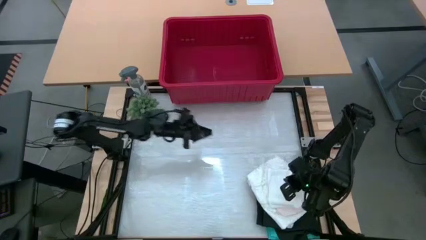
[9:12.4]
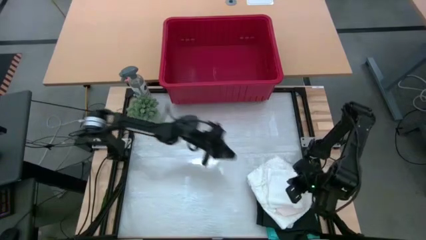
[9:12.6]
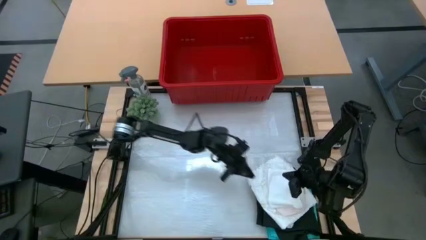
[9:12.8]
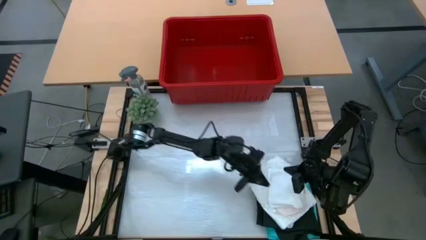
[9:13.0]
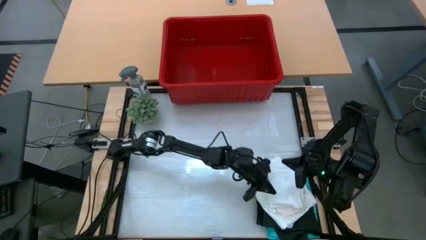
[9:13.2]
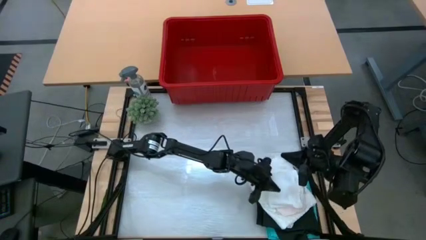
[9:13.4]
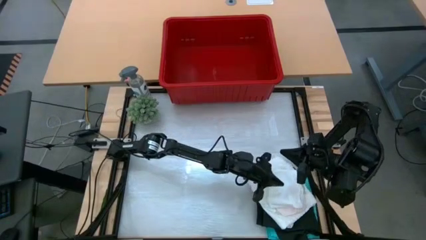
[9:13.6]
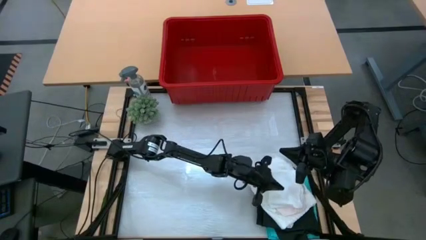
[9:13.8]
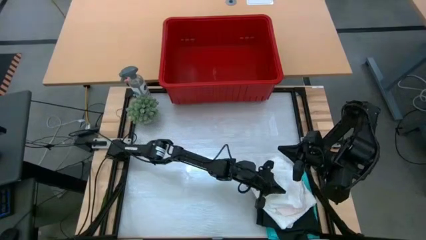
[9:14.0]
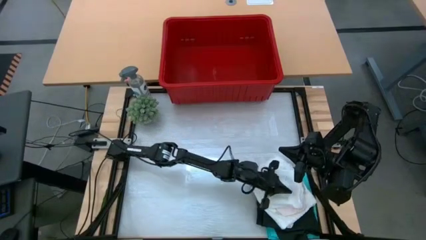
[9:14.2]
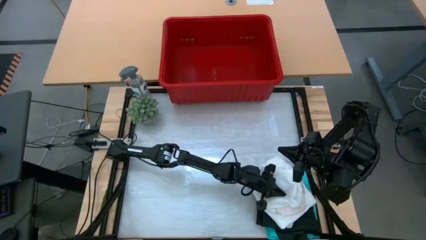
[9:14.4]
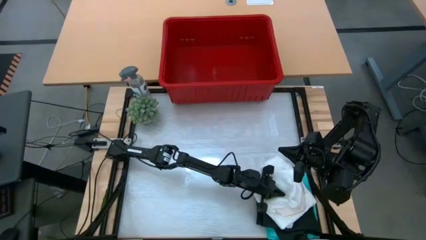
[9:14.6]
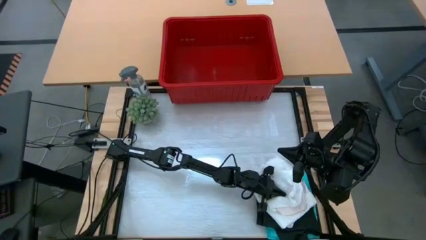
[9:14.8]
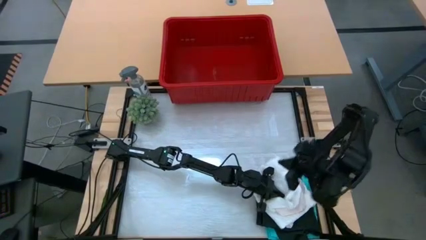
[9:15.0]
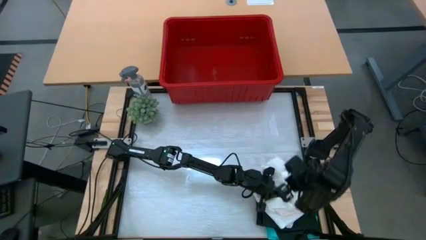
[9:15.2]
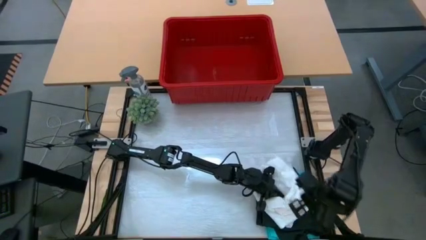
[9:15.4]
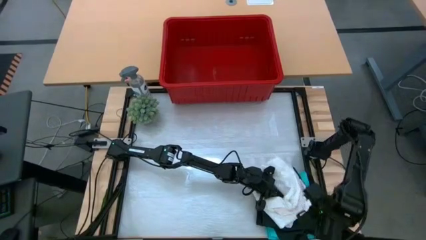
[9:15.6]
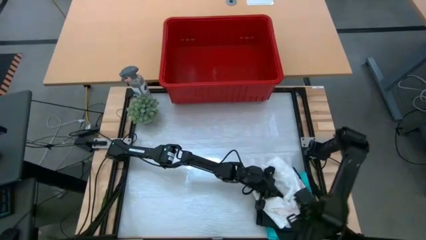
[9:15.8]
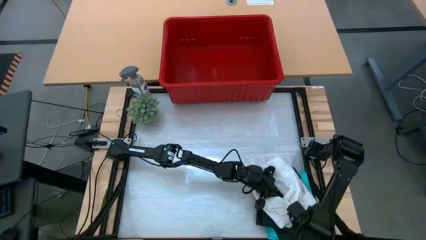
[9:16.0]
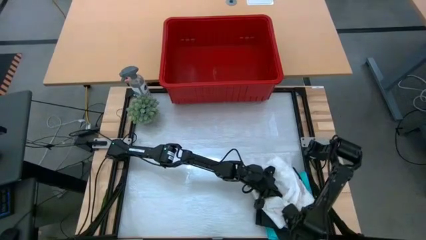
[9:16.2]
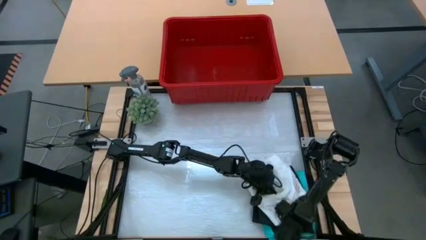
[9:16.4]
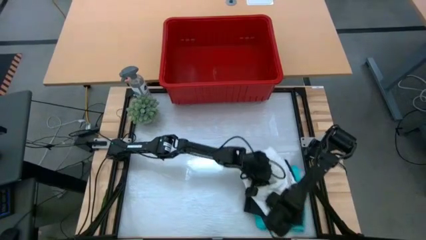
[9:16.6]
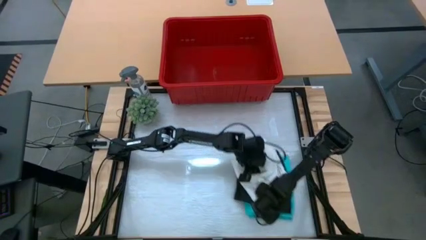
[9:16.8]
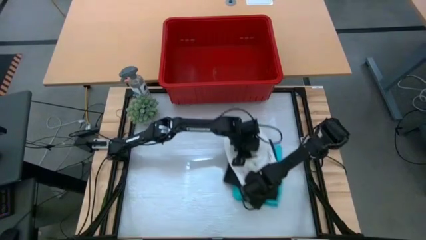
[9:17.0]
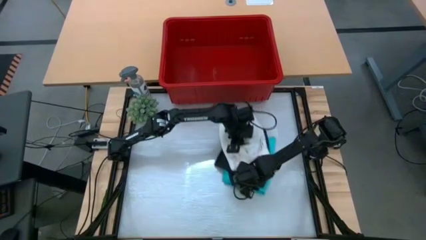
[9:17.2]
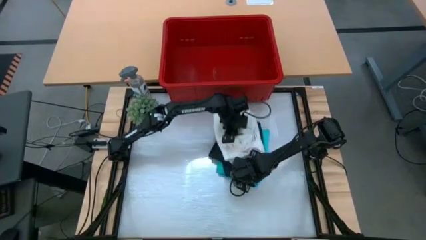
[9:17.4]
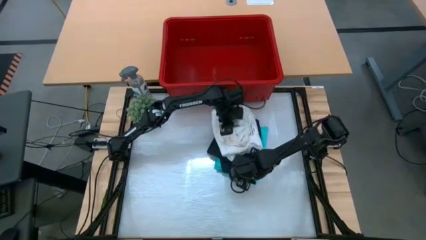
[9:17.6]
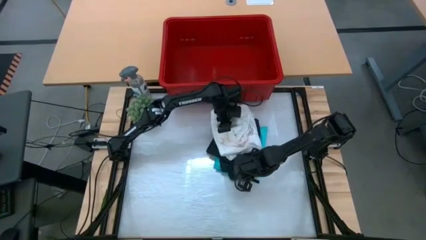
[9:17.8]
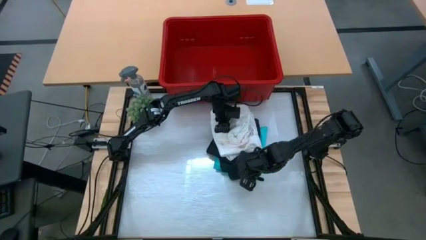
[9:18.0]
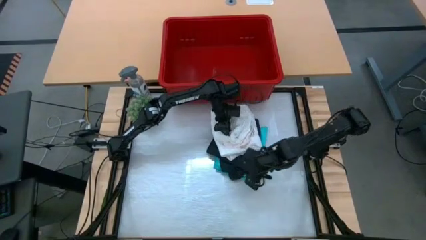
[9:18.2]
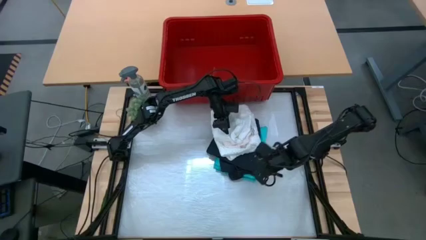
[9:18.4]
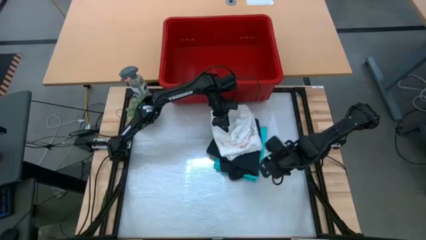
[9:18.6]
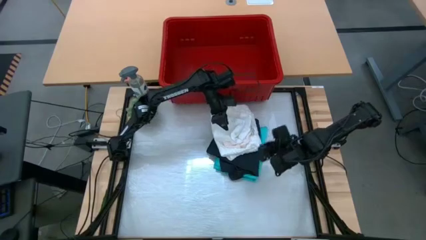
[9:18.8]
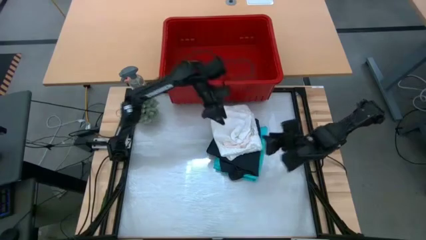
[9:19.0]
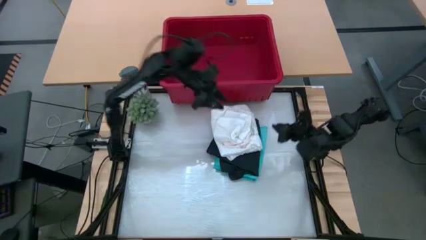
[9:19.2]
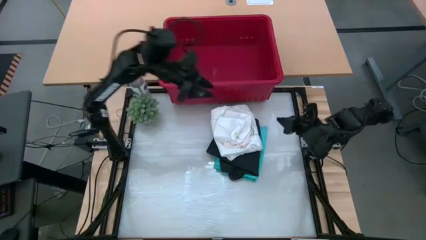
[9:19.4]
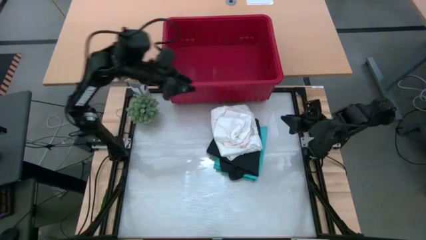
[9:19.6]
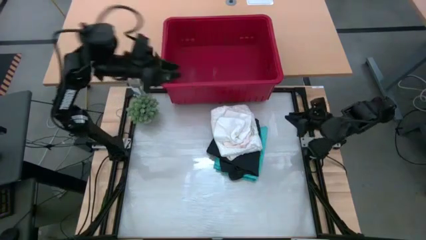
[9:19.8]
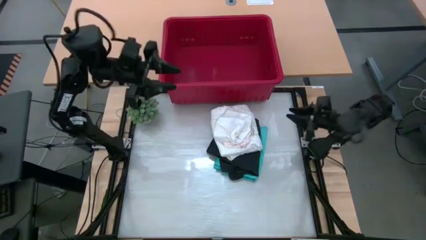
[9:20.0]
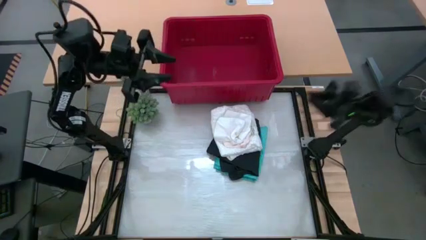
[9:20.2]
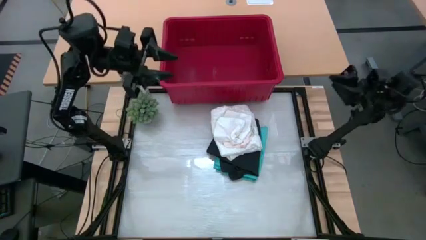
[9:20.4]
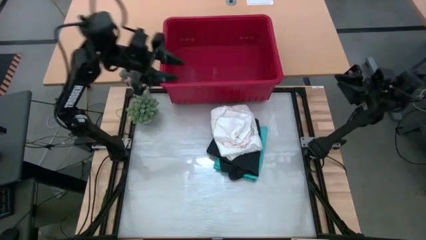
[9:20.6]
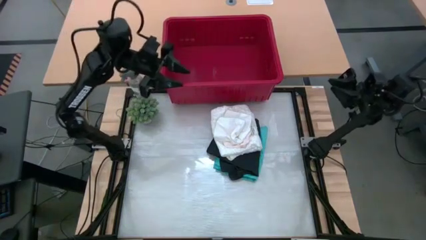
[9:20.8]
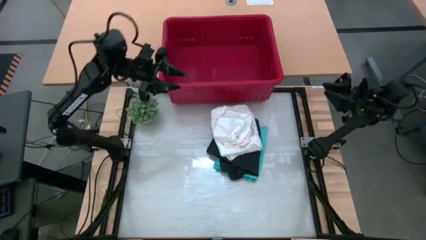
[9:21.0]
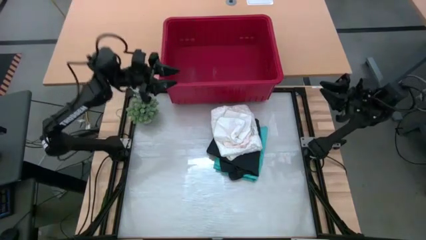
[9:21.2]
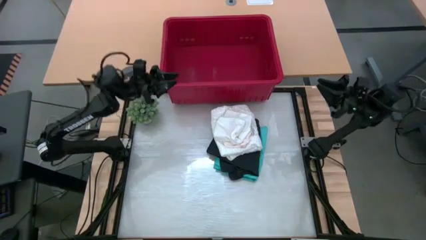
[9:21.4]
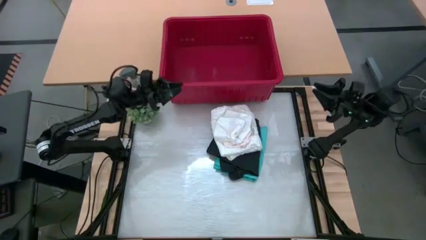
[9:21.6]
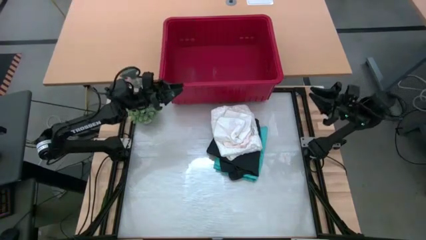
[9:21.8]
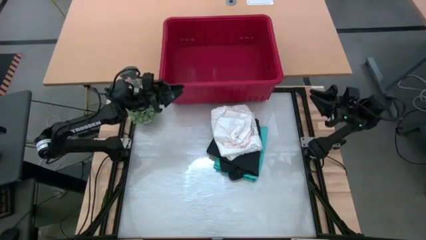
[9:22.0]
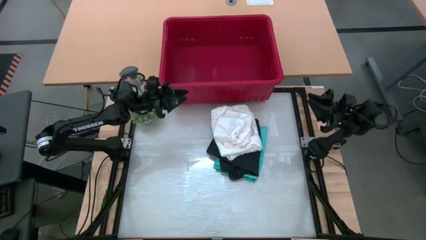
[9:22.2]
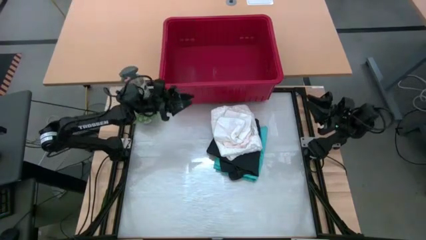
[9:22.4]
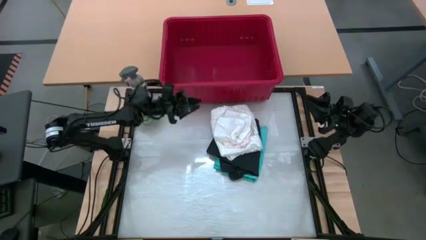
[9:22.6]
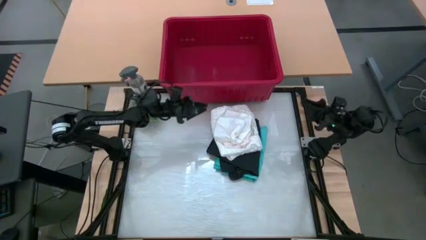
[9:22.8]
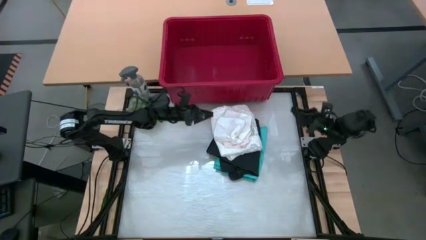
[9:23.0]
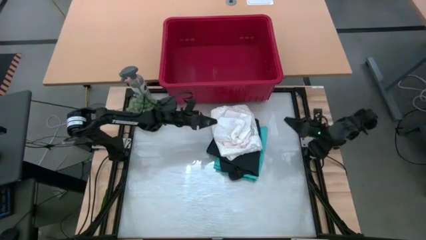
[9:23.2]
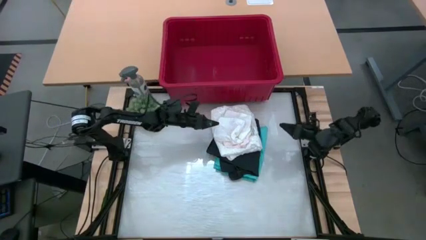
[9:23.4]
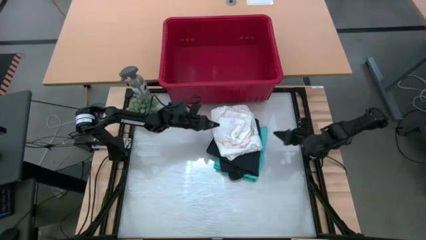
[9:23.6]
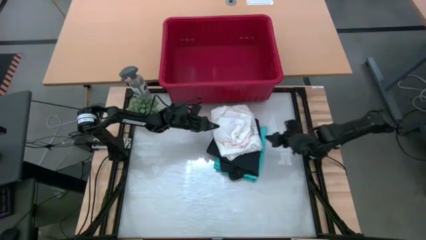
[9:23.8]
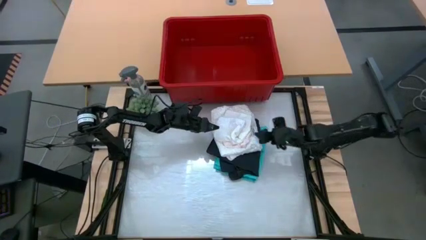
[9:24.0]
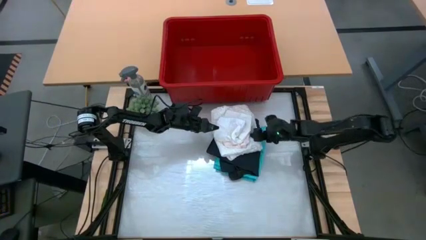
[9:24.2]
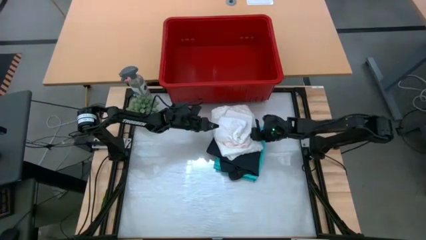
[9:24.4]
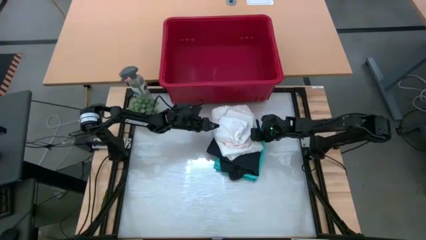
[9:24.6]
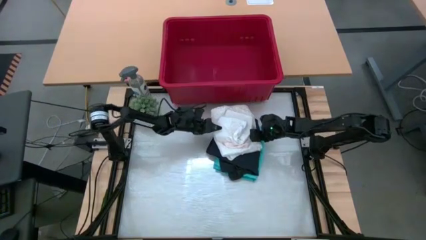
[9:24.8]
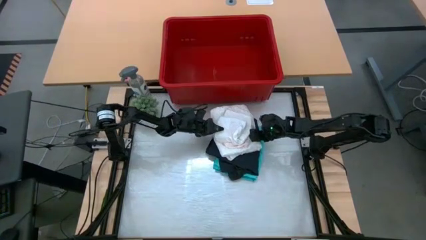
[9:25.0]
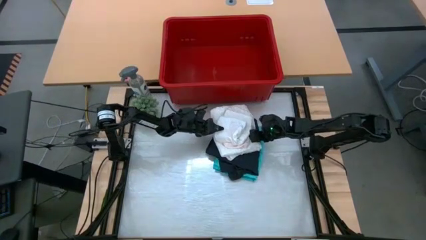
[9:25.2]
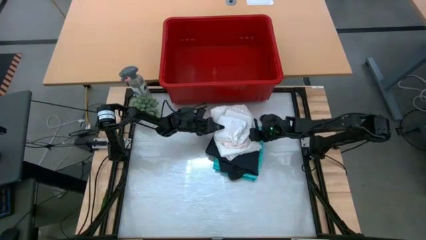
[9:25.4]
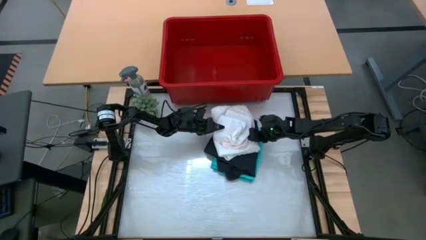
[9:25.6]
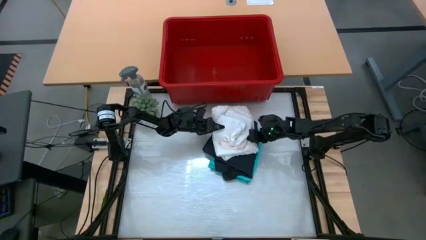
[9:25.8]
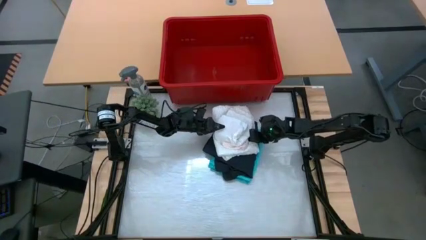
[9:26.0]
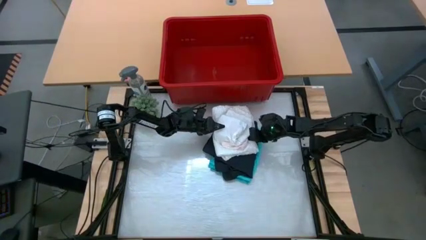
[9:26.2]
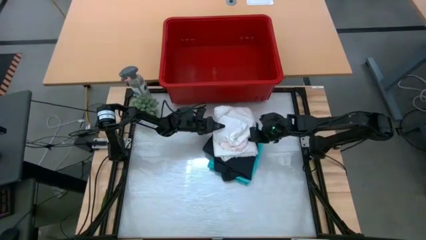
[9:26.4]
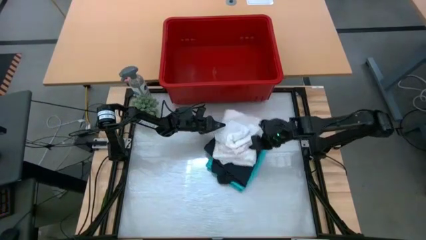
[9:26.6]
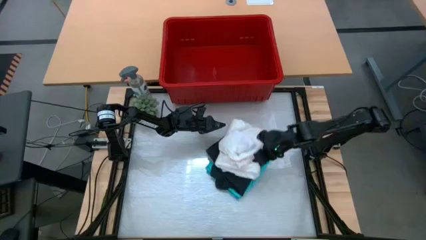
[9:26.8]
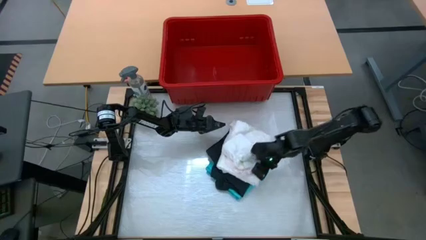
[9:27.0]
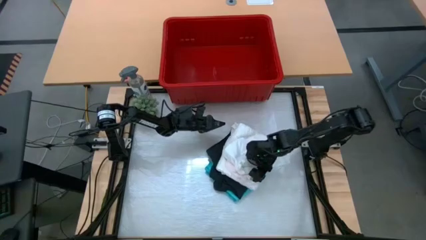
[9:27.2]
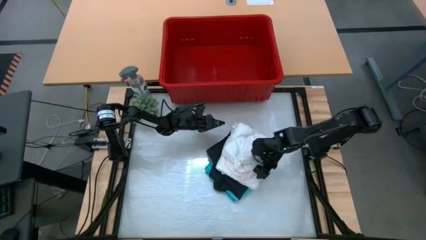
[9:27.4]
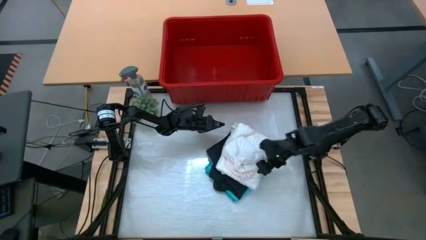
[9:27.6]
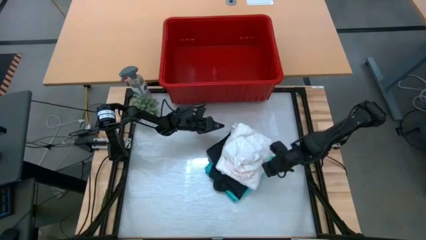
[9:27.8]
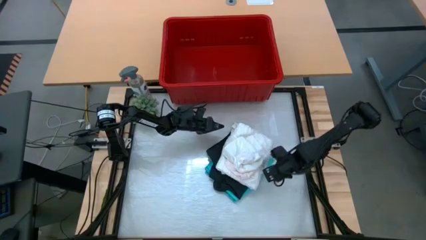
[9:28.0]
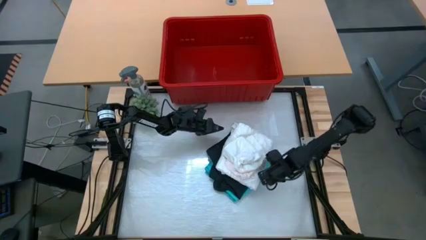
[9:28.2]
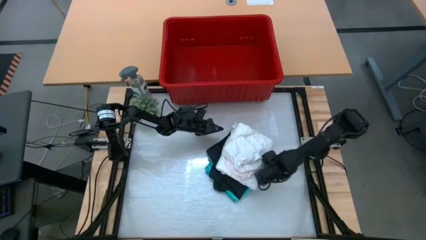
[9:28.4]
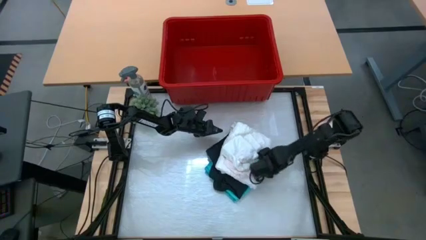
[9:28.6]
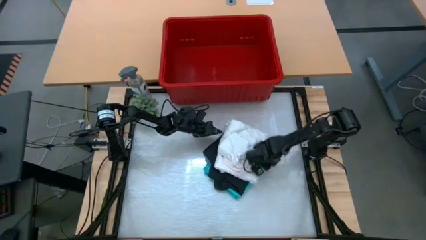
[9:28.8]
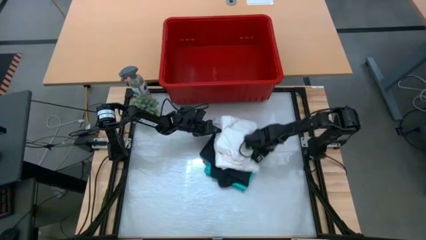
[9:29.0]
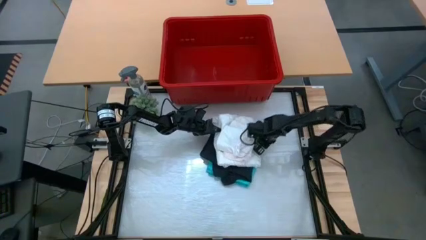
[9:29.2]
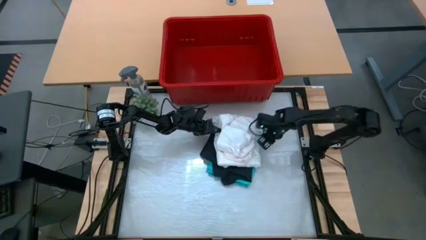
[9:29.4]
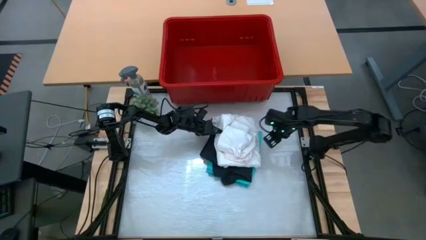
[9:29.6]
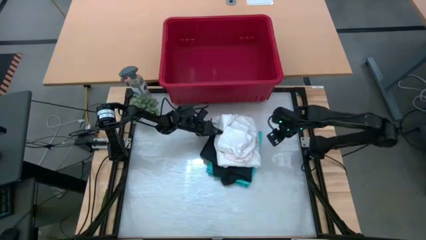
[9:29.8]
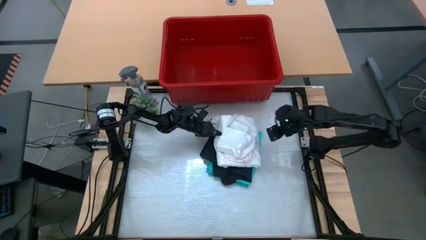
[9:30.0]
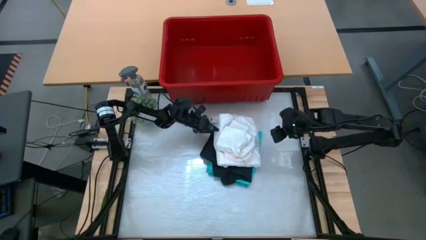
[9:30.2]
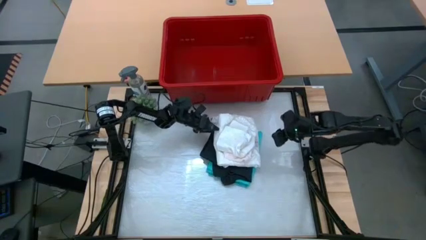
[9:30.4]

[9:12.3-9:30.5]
Task: Fold Laundry from Bin
Put the clothes into the red organizer bin
